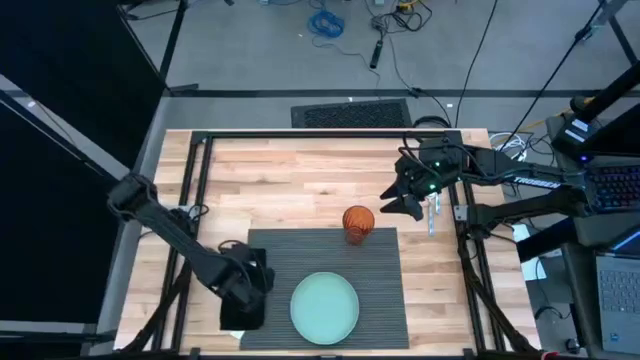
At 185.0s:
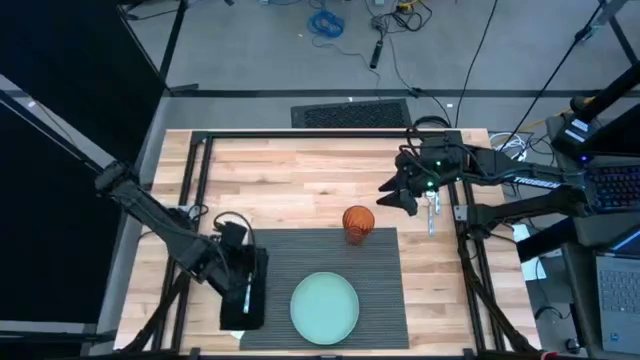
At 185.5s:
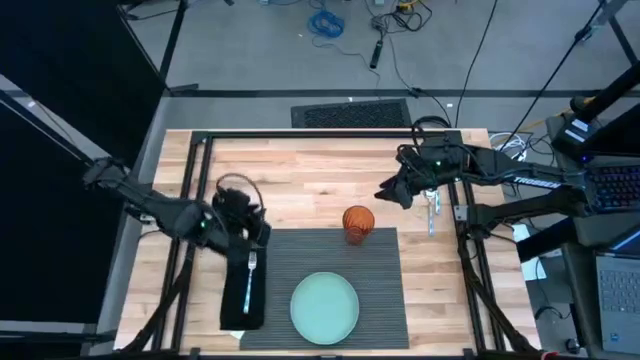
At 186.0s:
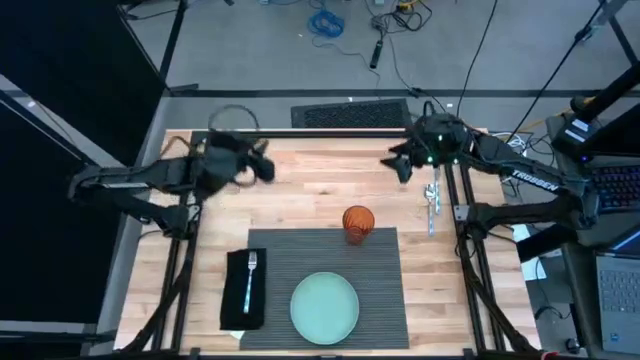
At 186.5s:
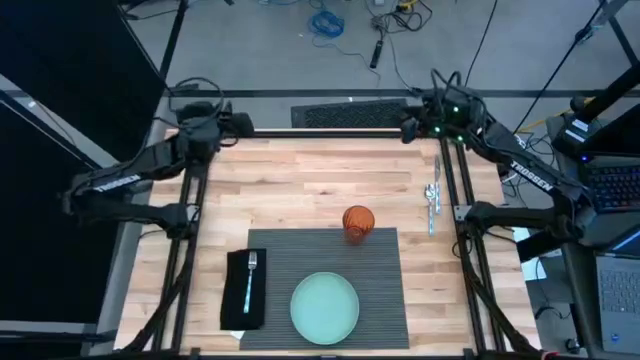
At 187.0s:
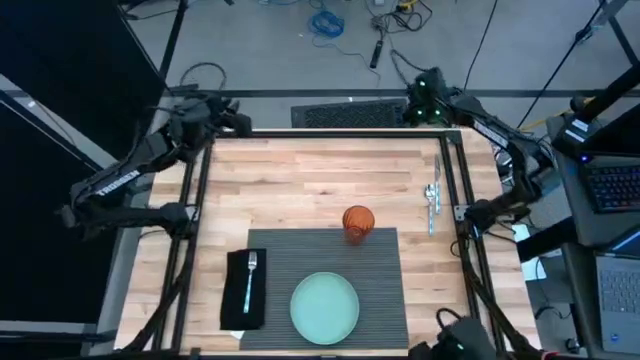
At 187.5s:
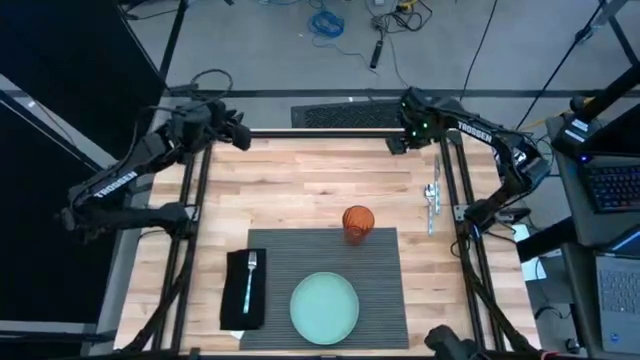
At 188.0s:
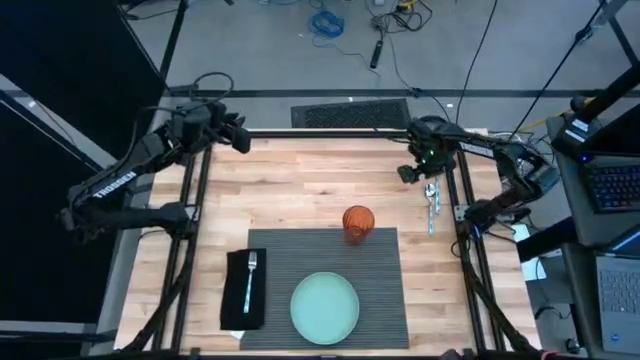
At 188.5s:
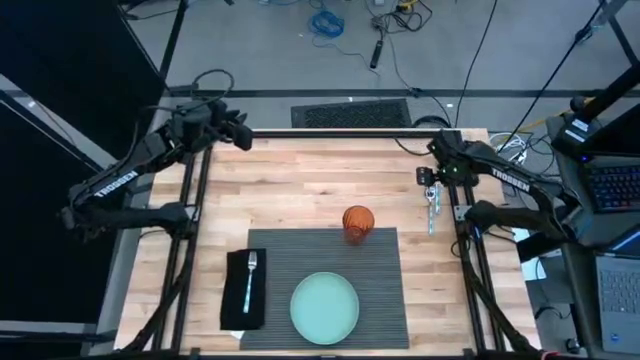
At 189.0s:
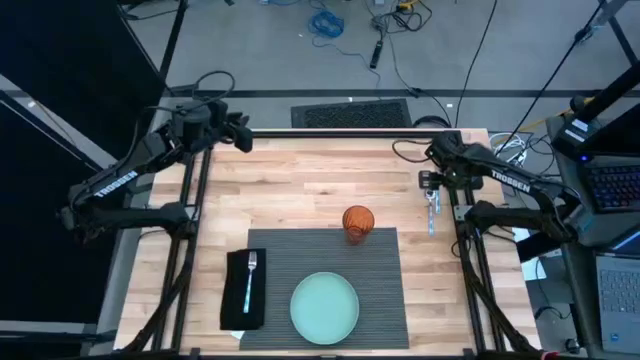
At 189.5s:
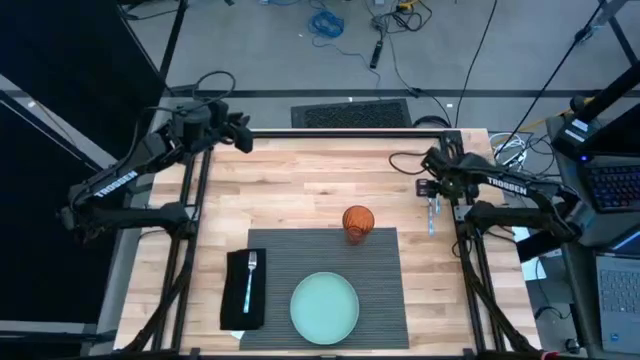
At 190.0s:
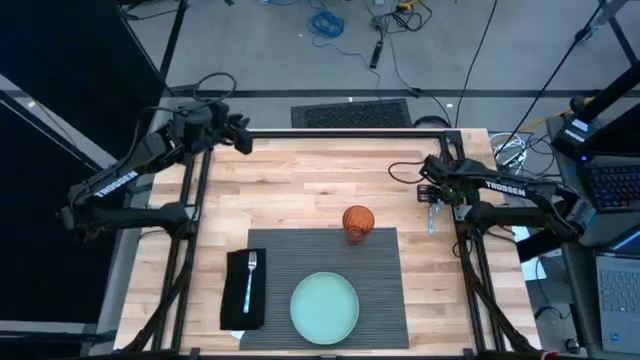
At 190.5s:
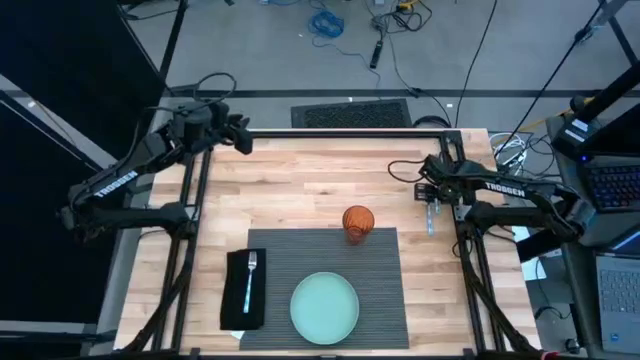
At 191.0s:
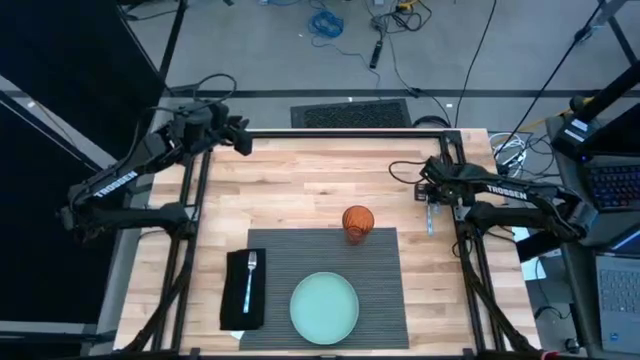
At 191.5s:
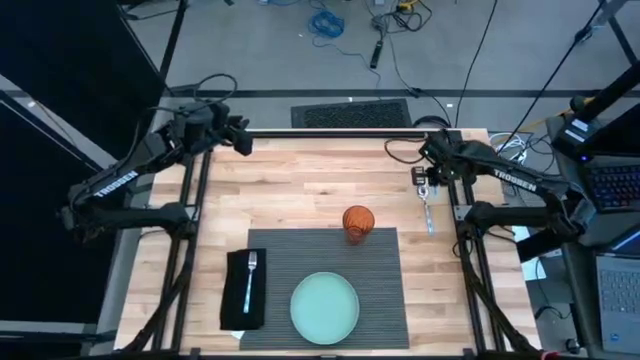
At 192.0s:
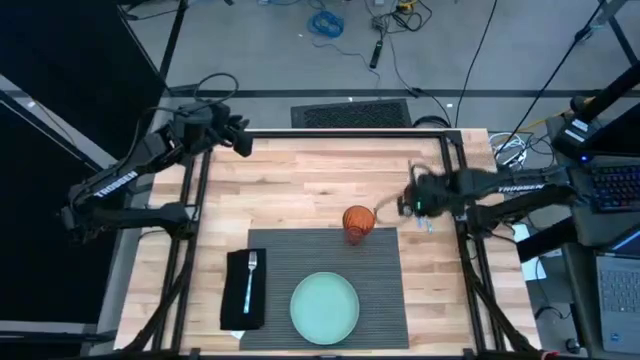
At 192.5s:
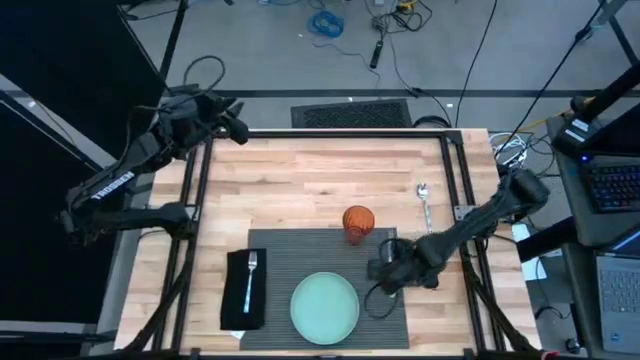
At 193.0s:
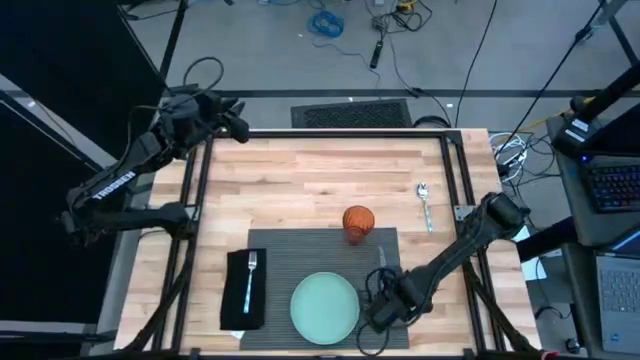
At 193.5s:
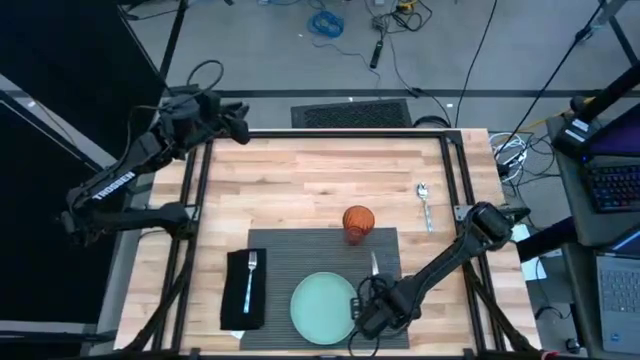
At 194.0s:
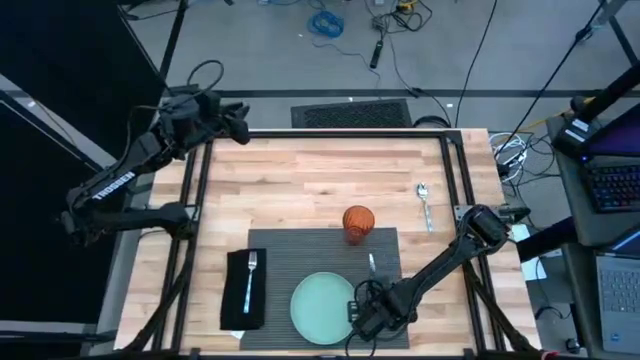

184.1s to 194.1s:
Task: Set table place
Put the blue knife on the gray mat to the right of the green plate

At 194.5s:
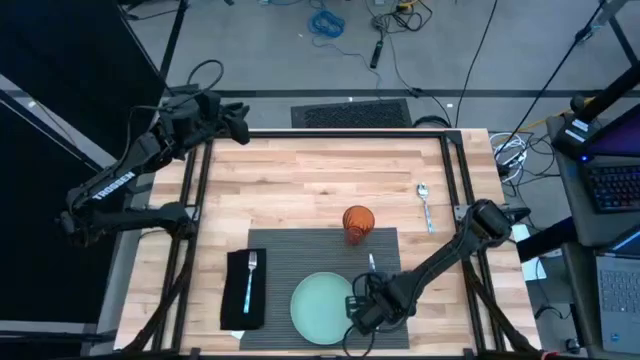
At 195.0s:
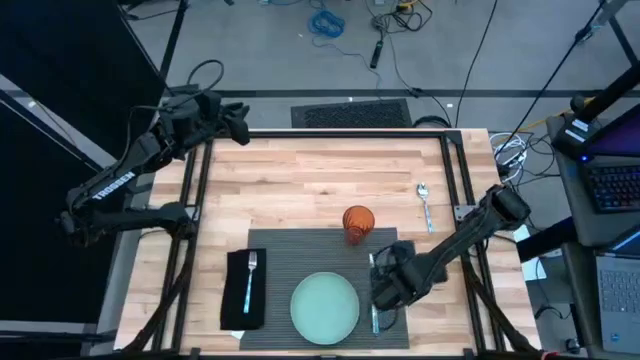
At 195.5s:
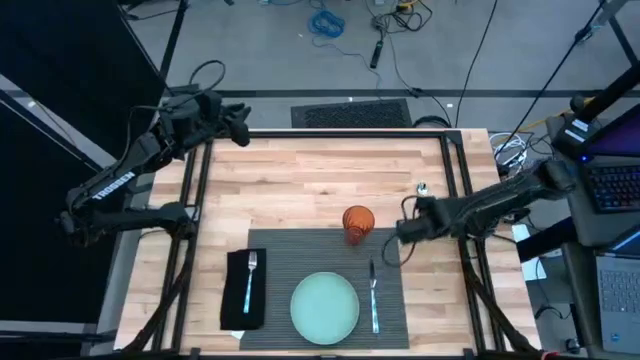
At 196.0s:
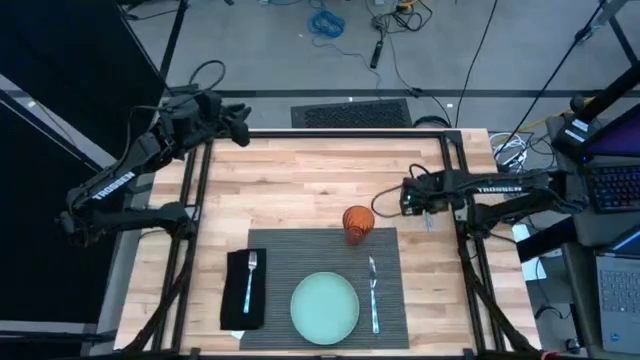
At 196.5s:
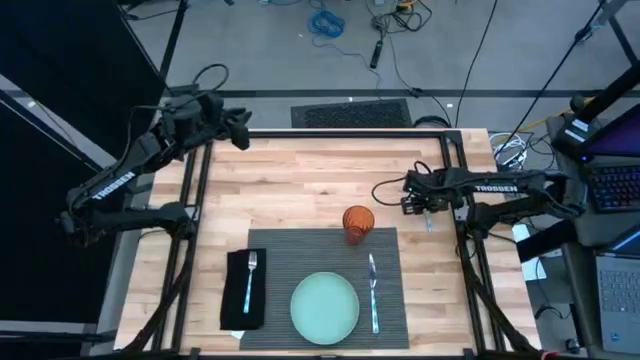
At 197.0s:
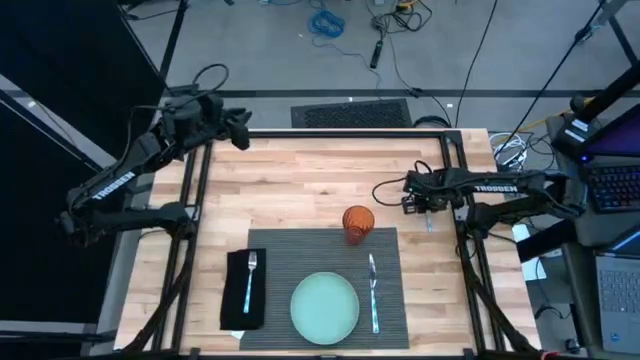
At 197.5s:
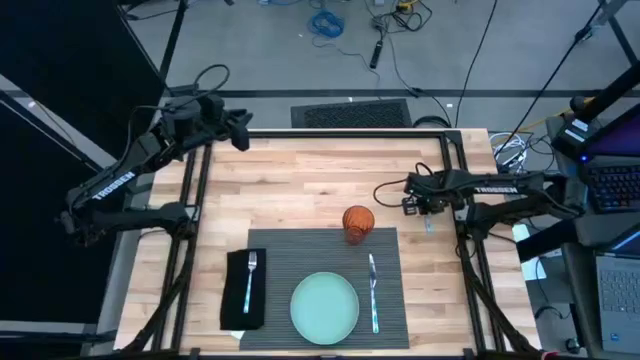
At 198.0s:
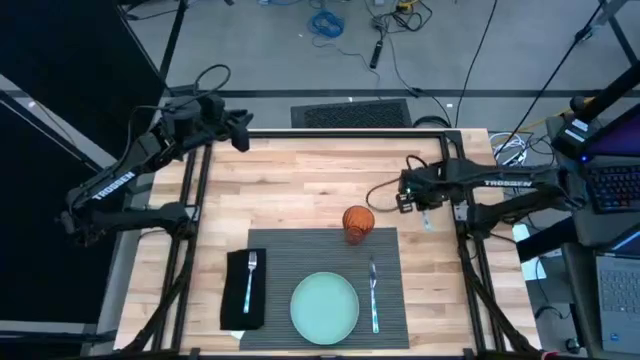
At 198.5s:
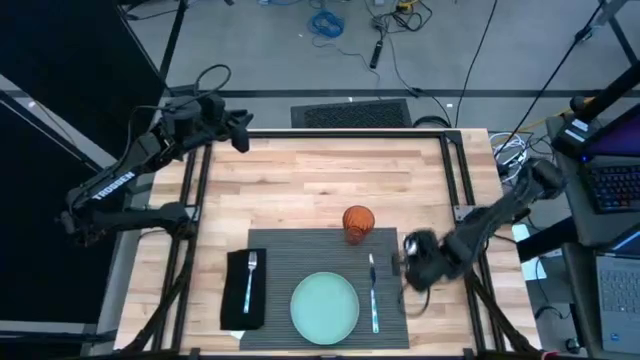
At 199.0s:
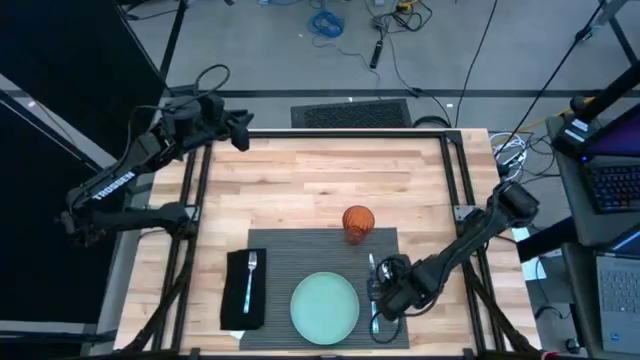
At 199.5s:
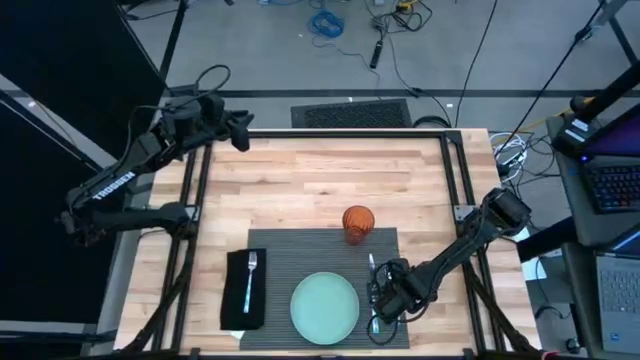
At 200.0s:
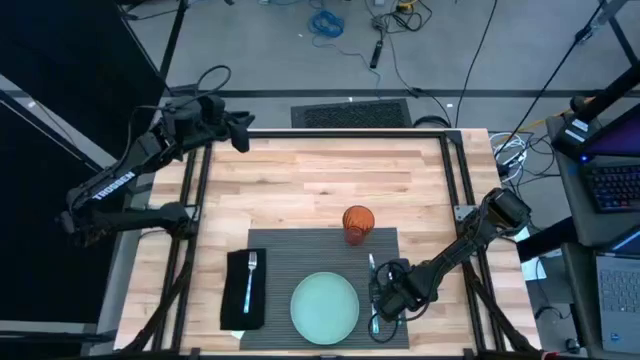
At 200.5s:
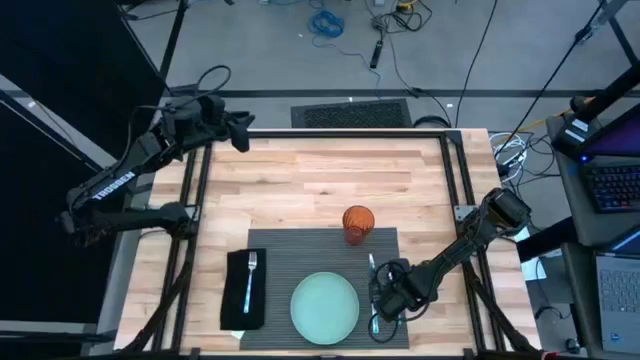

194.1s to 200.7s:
Put the blue spoon on the gray mat to the right of the blue knife

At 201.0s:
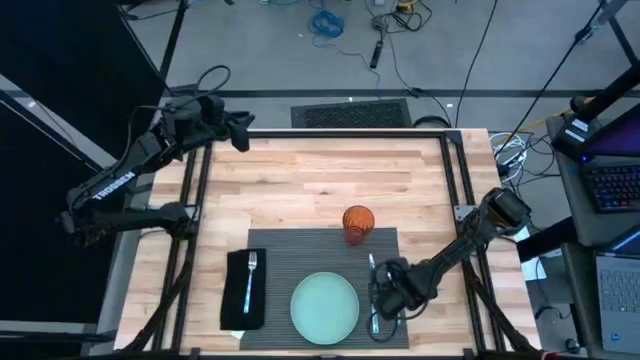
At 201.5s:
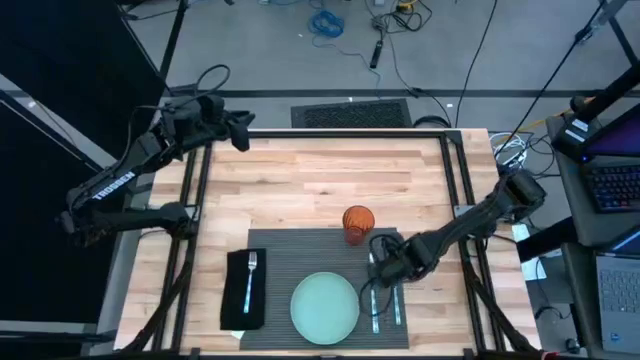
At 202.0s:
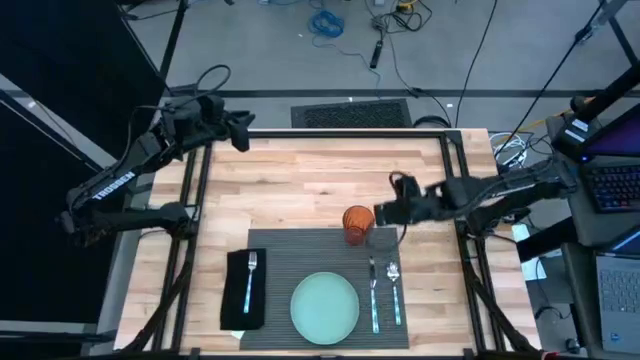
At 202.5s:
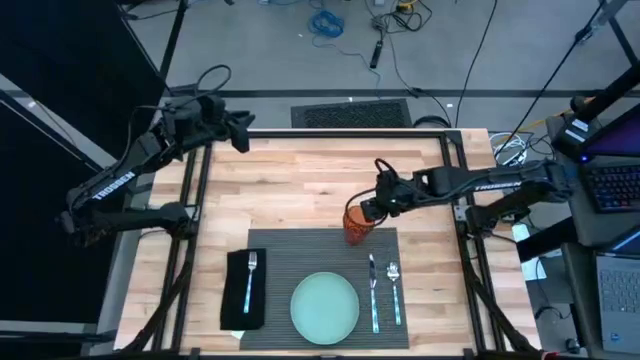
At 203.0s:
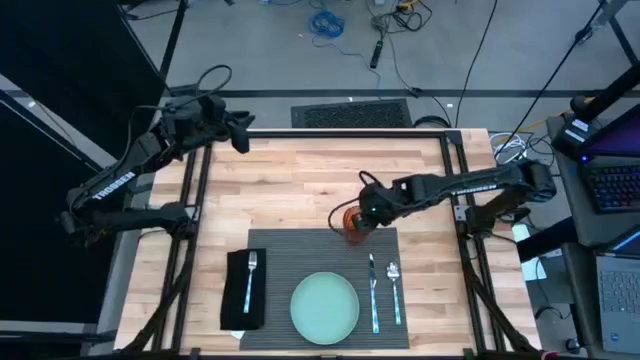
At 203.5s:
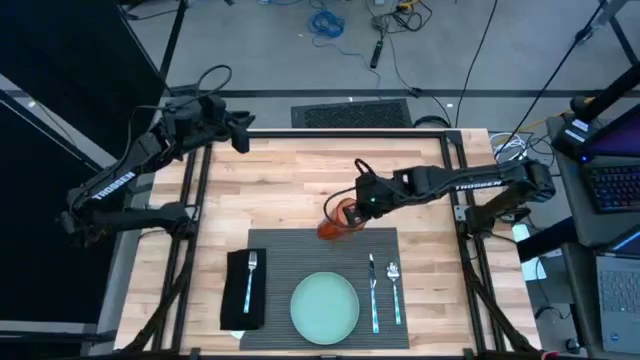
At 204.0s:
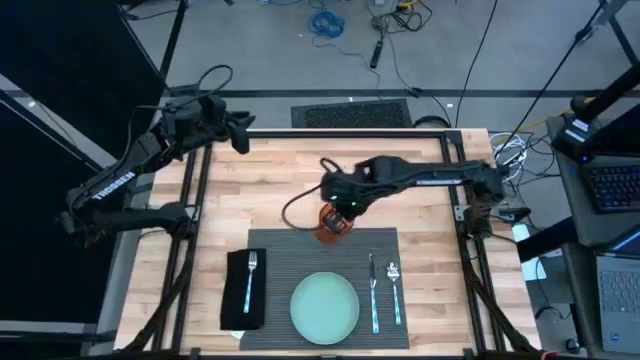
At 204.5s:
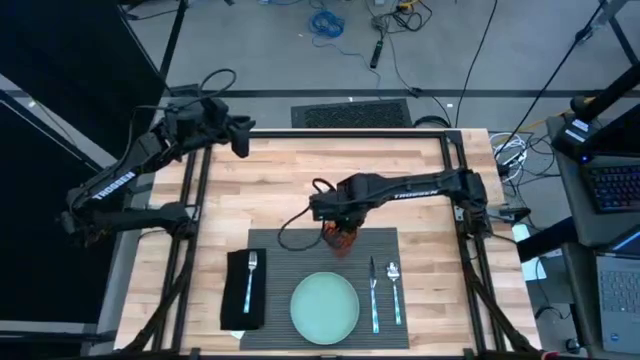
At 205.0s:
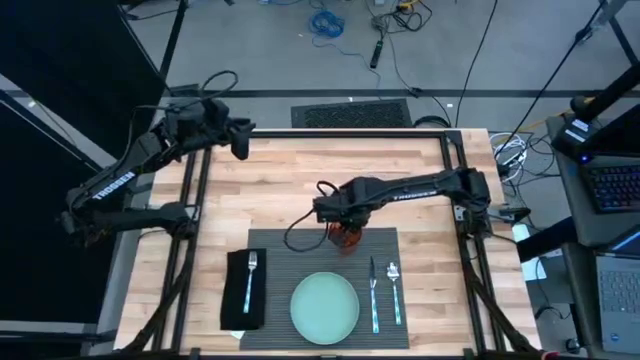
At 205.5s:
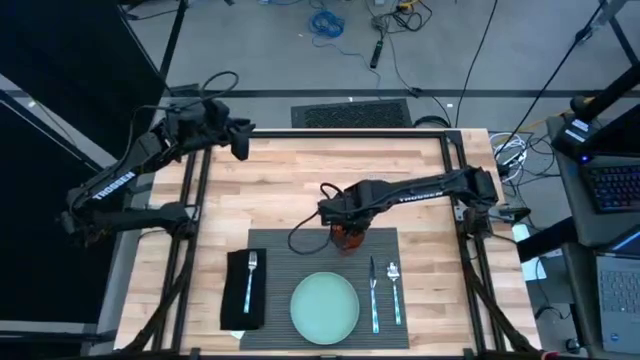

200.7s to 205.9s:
Adjust the brown glass on the gray mat
